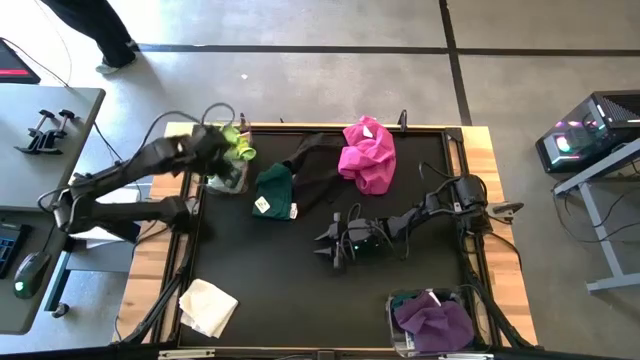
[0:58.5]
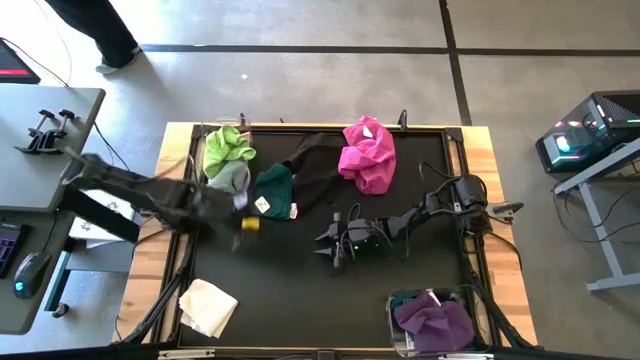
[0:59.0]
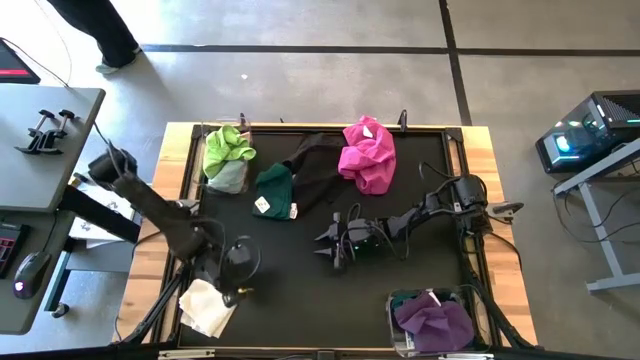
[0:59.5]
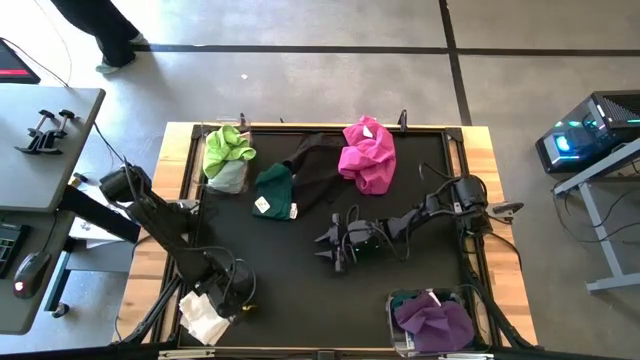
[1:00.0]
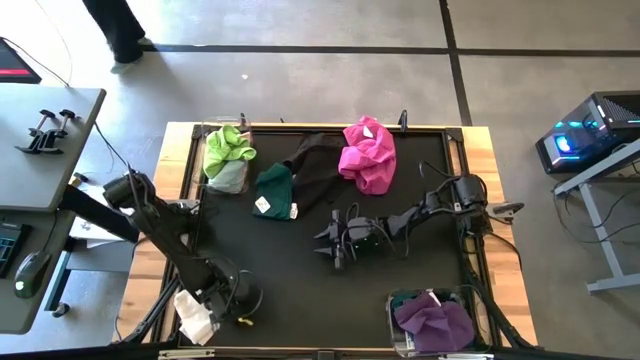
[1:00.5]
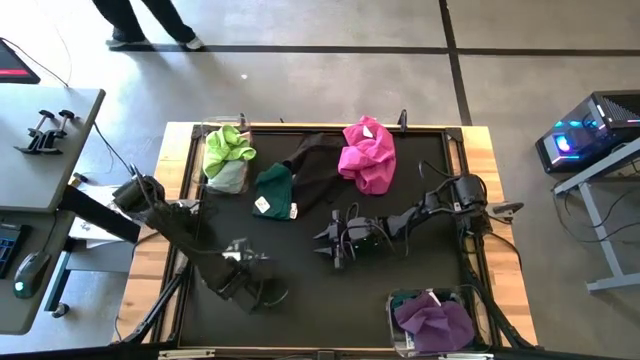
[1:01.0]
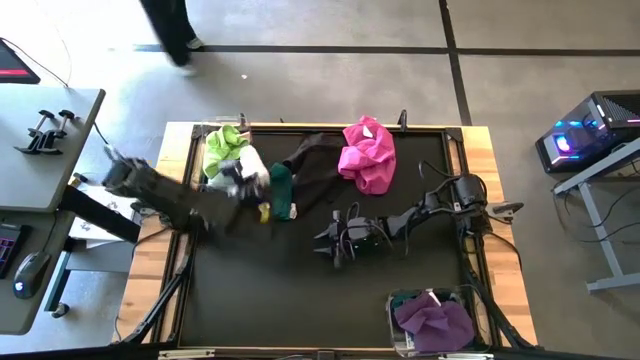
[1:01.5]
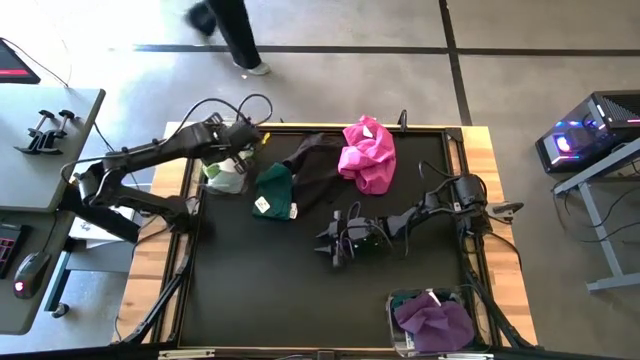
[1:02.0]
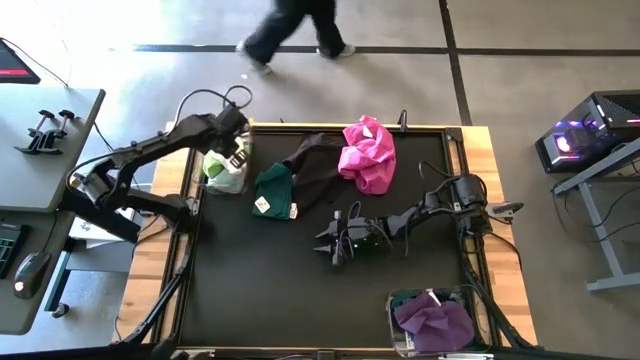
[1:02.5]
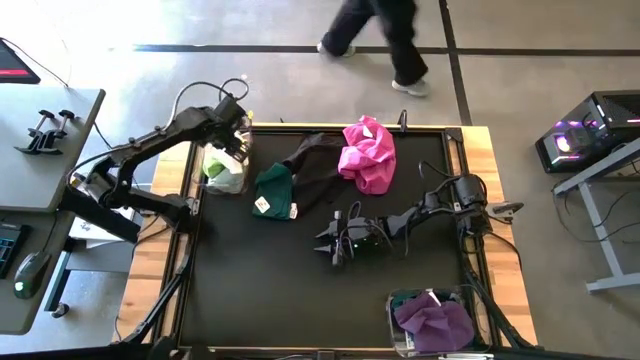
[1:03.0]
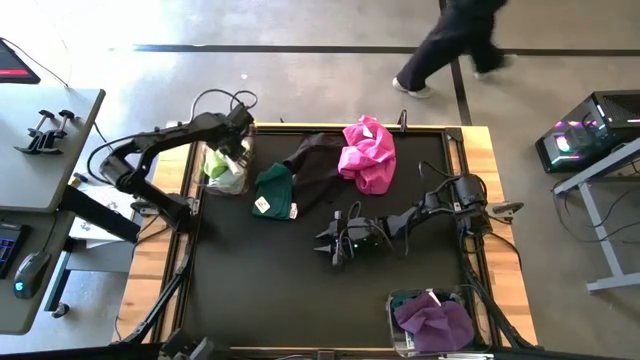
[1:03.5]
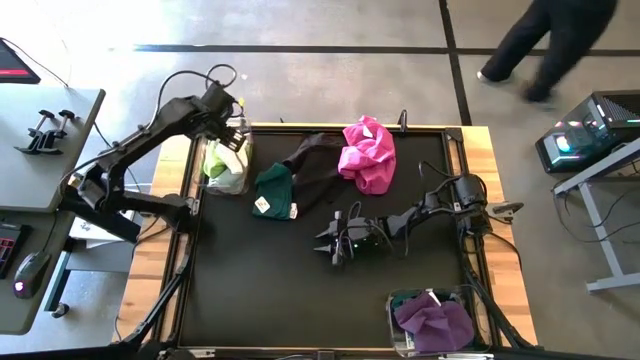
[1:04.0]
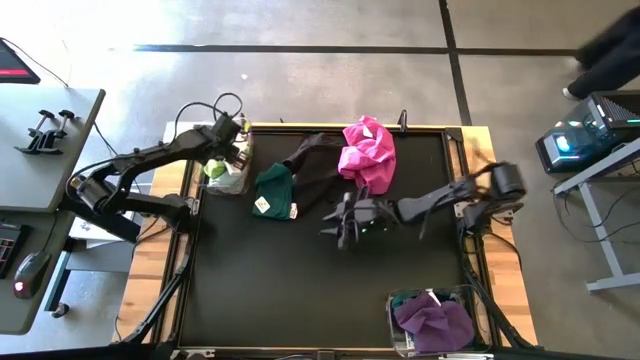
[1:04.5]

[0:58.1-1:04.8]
Task: Sort towels by color in basket
Put the white towel into the top transparent bin

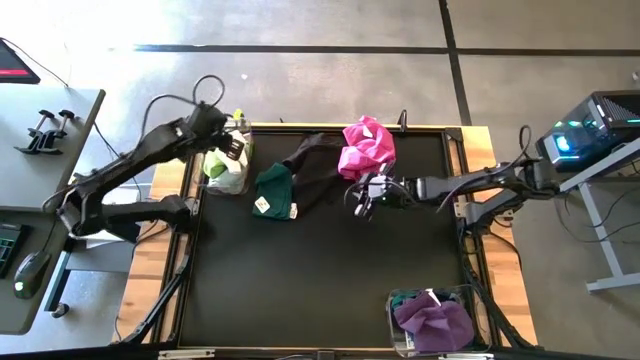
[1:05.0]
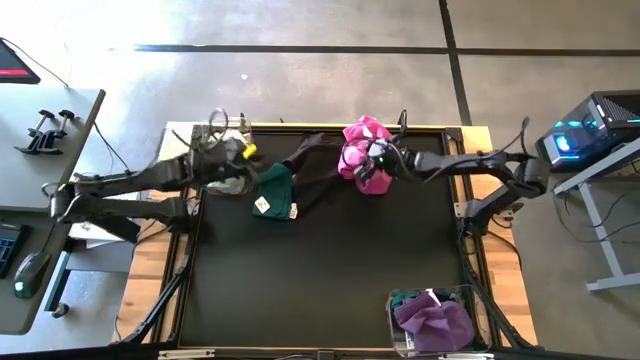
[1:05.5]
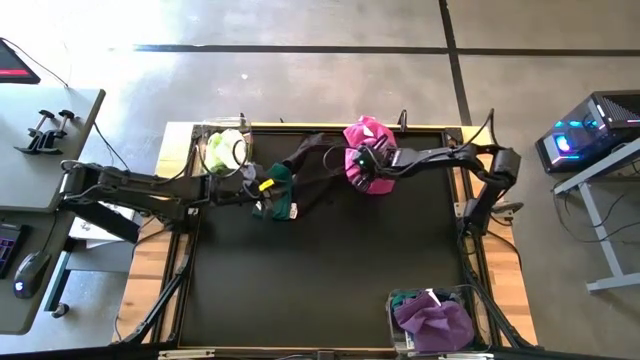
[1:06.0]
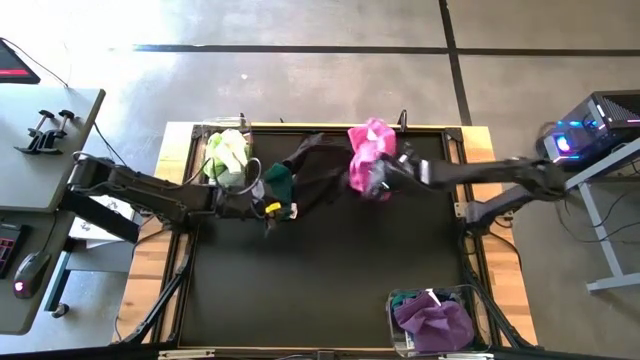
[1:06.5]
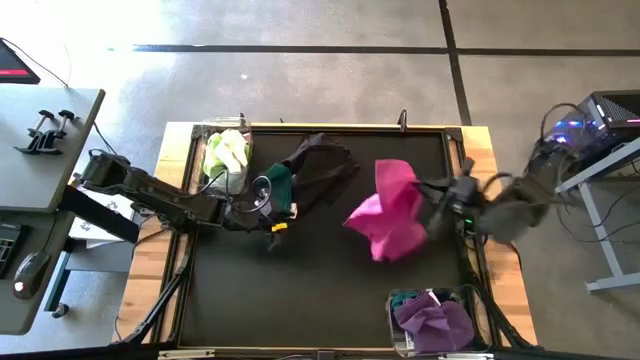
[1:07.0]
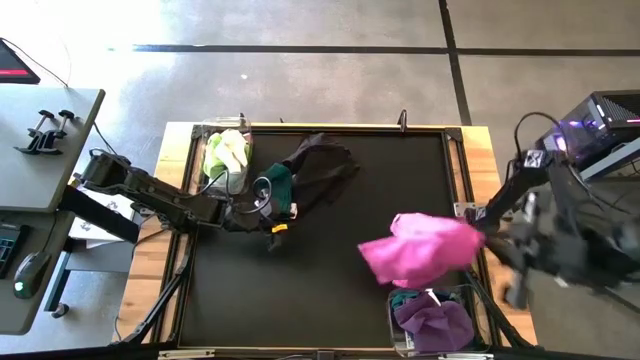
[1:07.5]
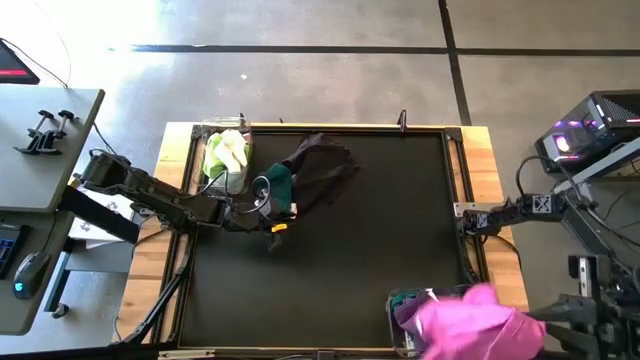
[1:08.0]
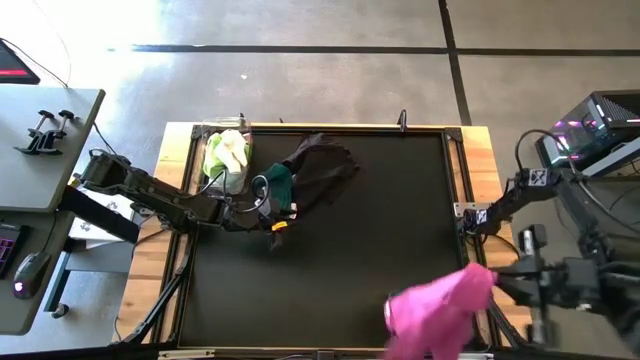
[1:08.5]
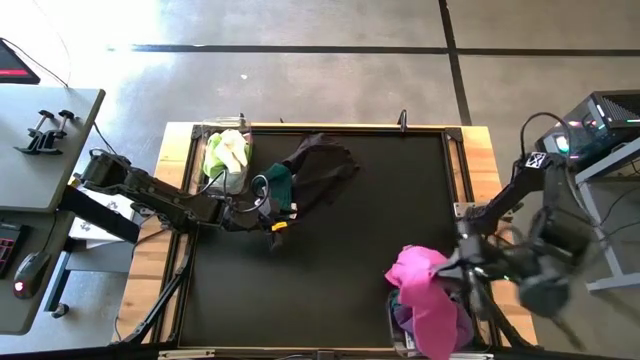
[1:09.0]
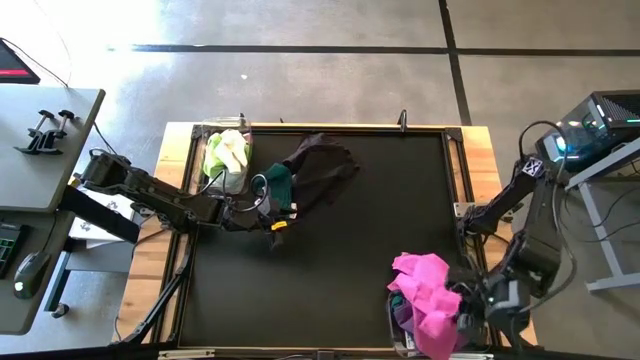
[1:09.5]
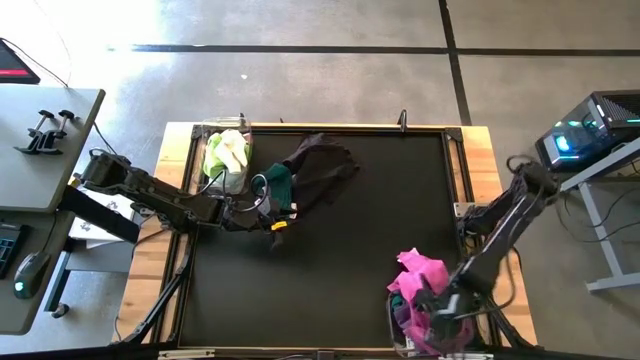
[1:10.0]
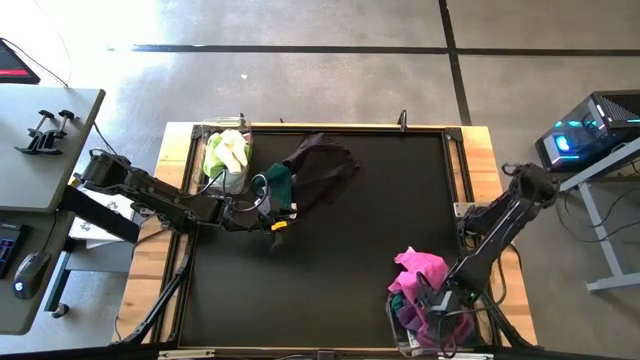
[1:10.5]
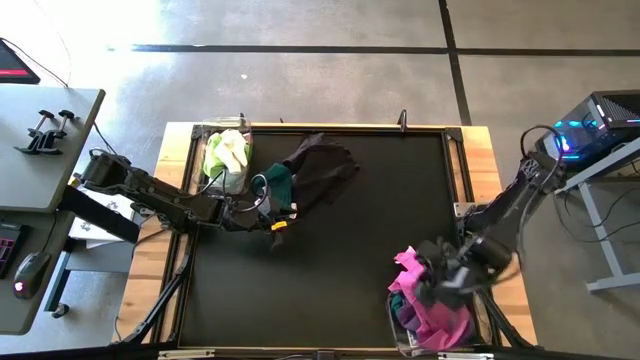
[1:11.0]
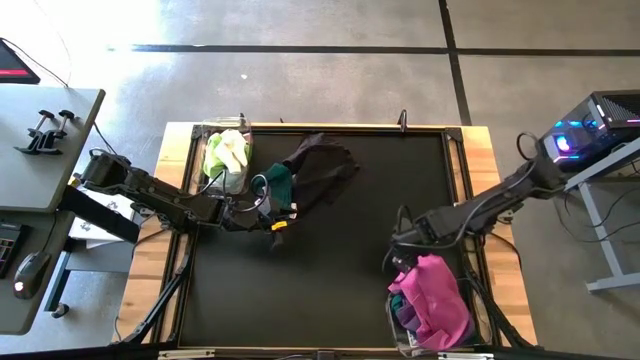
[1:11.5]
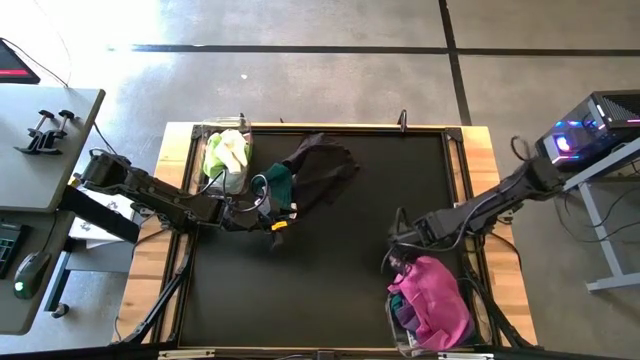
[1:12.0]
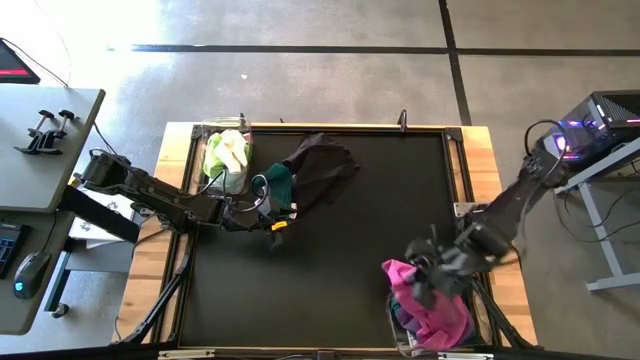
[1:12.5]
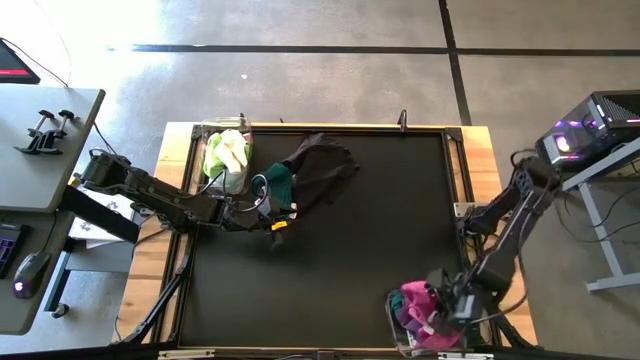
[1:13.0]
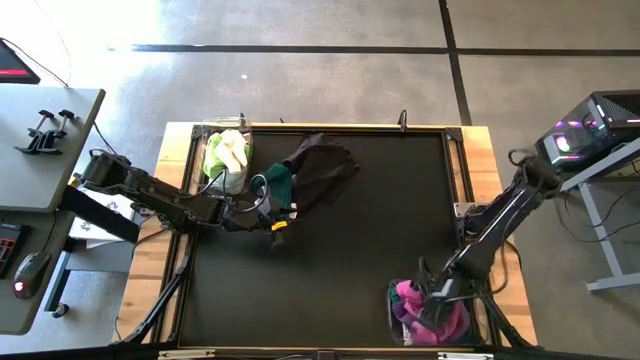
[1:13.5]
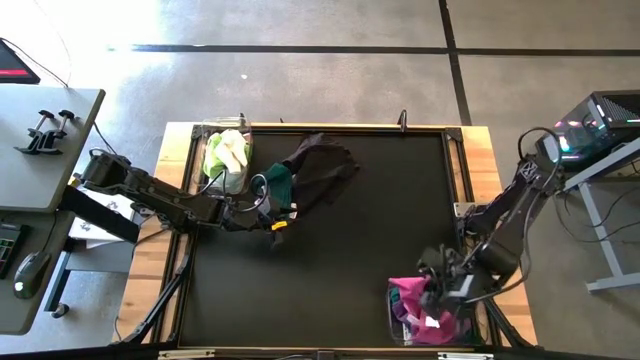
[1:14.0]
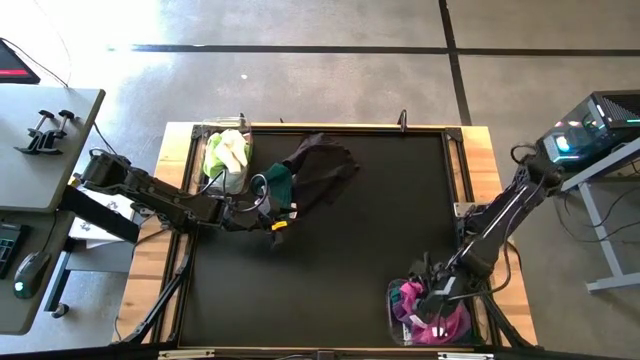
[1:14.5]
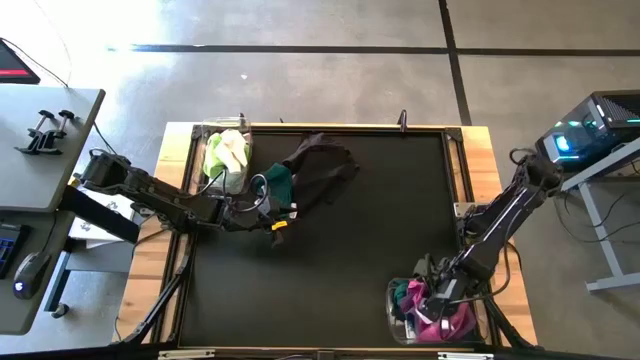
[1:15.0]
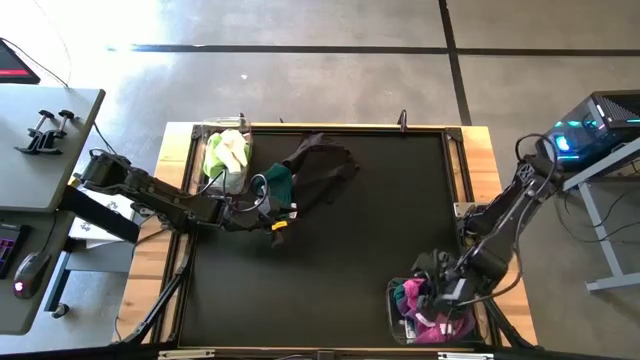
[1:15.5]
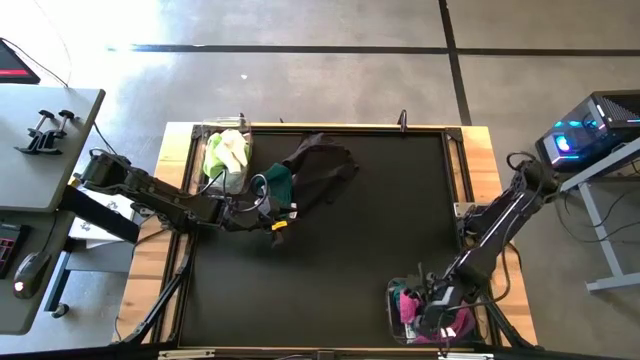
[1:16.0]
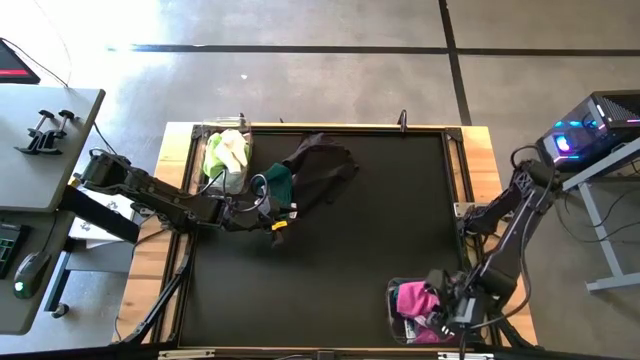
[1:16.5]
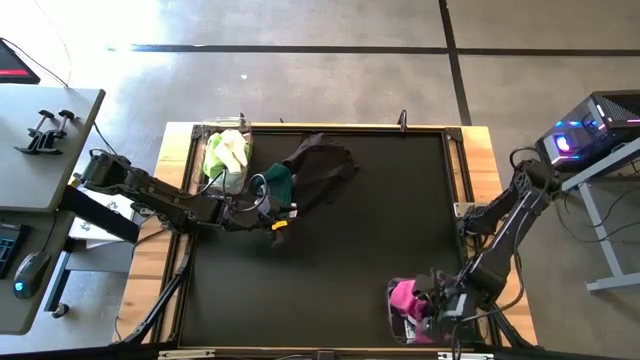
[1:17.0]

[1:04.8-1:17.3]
Put the pink towel into the bottom transparent bin

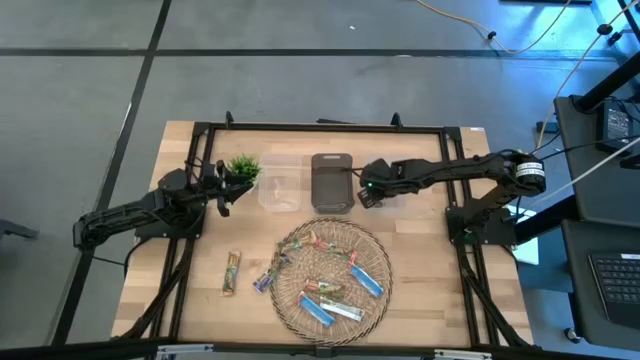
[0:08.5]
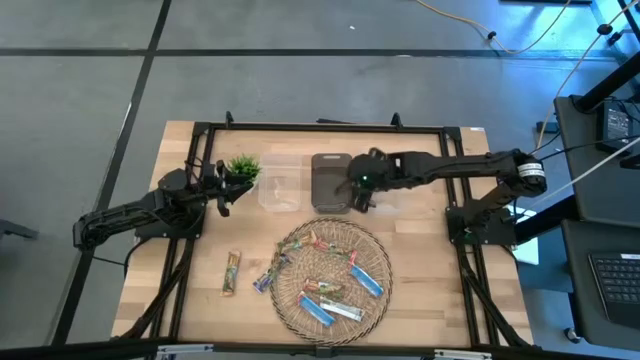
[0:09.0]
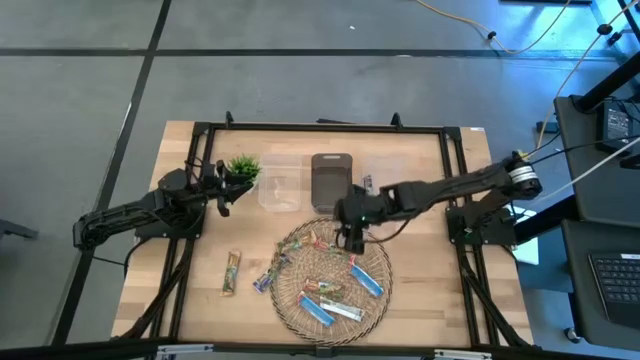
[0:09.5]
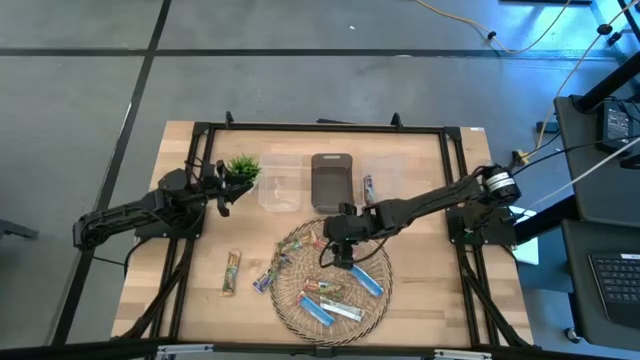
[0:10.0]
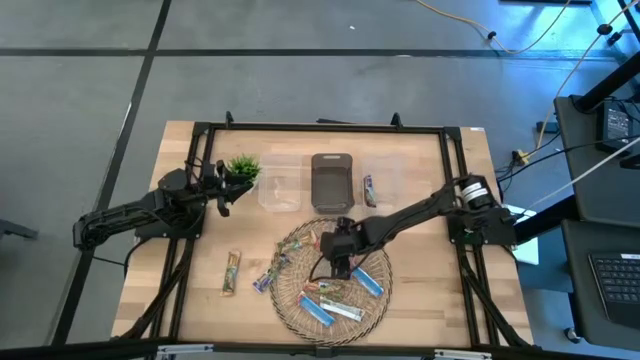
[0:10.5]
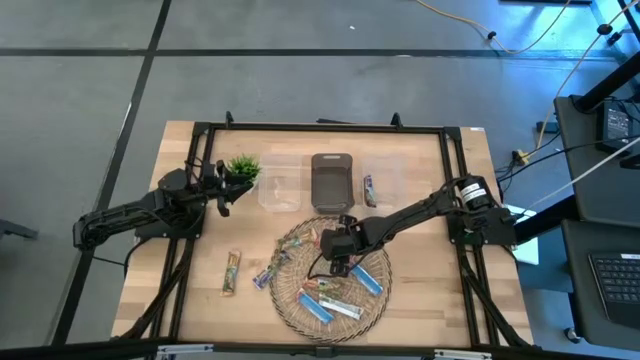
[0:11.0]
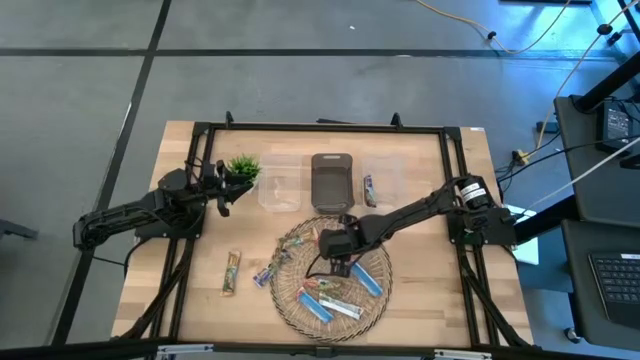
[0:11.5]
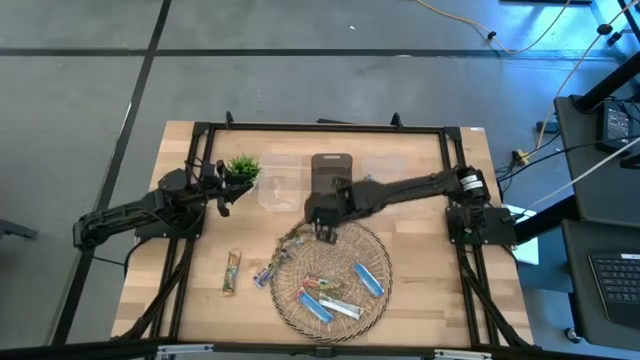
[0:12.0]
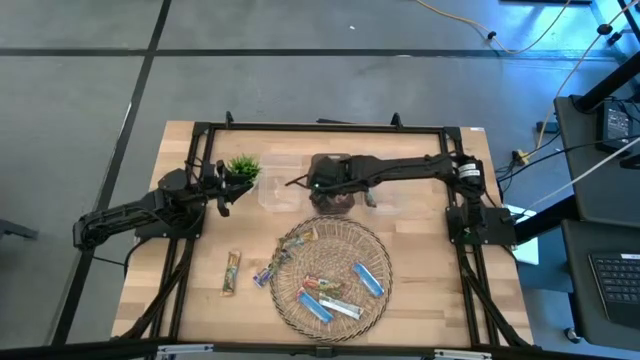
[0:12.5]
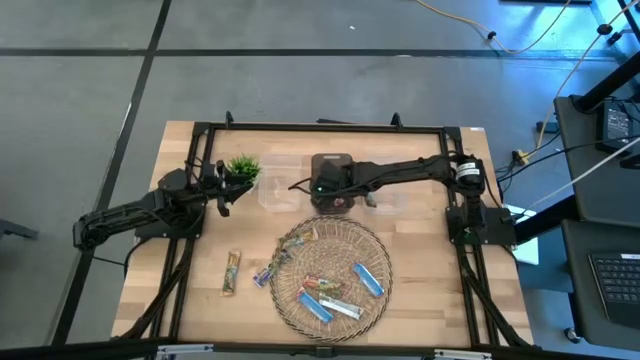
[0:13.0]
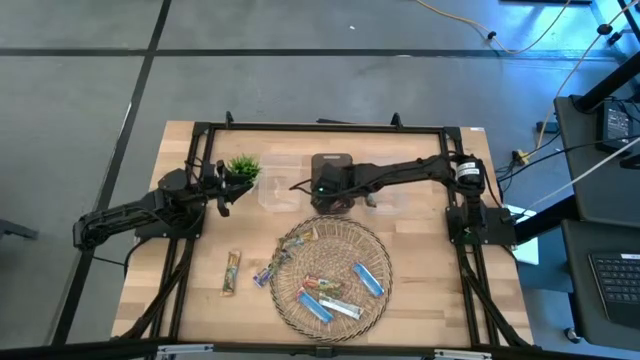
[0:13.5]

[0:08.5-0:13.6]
Task: Pick and place Granola Bars by type
Put the red granola bar into the black bin
